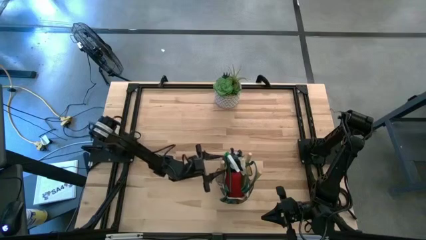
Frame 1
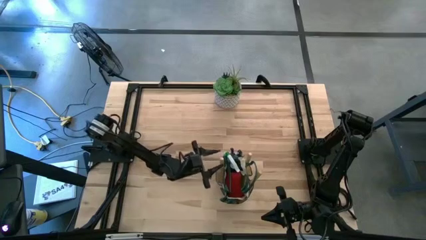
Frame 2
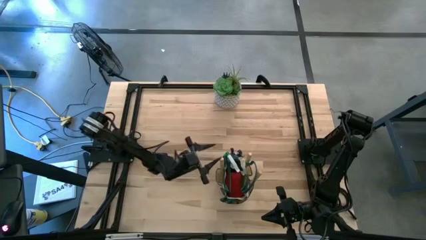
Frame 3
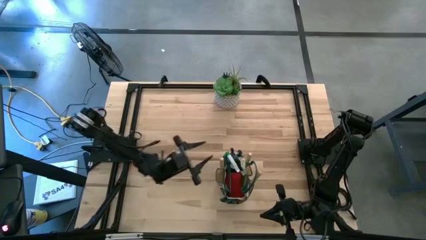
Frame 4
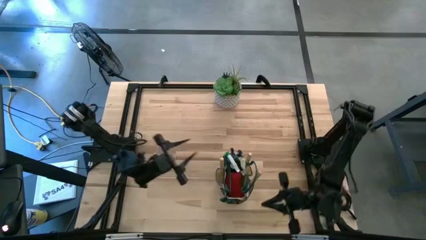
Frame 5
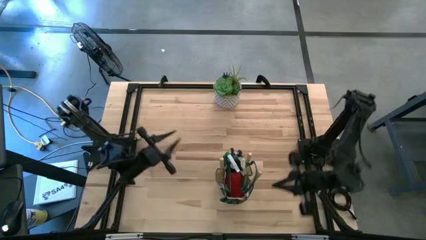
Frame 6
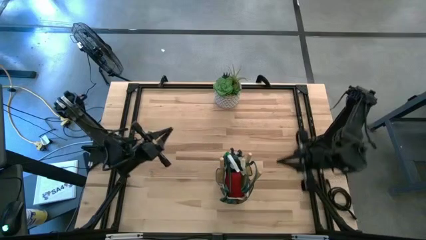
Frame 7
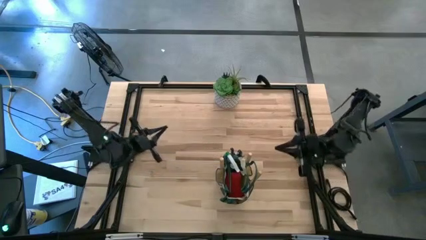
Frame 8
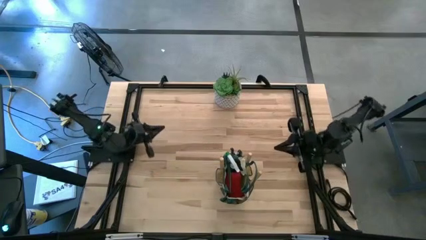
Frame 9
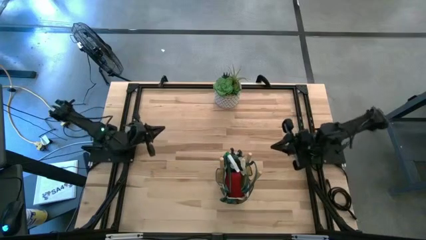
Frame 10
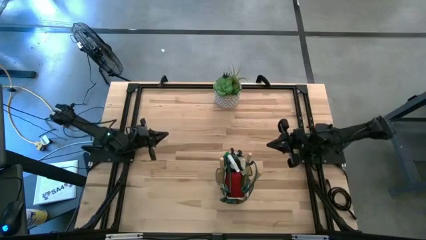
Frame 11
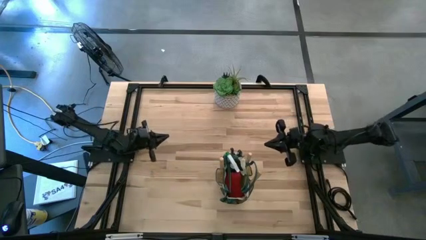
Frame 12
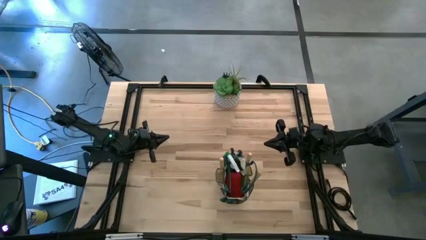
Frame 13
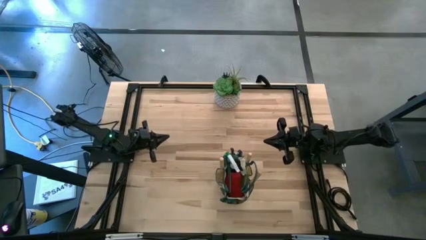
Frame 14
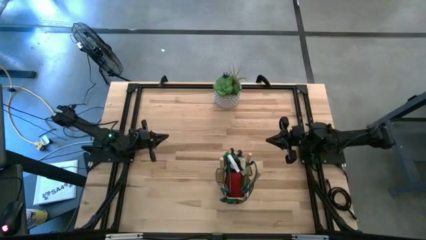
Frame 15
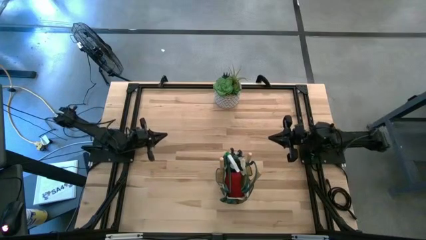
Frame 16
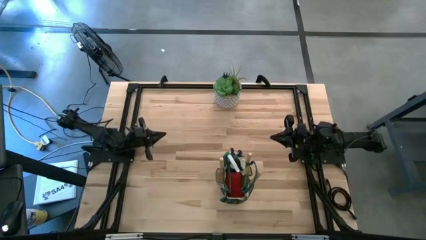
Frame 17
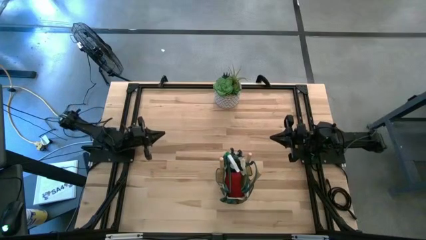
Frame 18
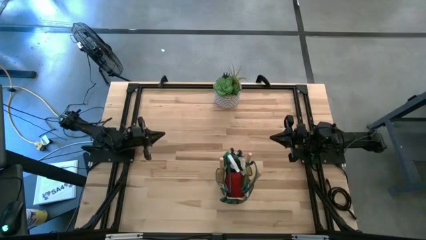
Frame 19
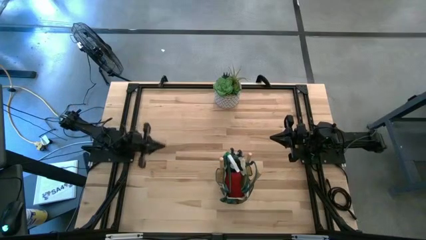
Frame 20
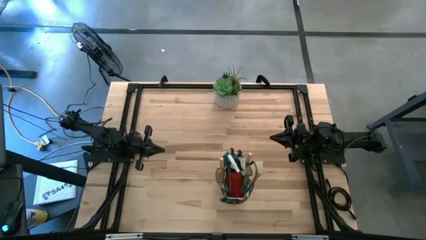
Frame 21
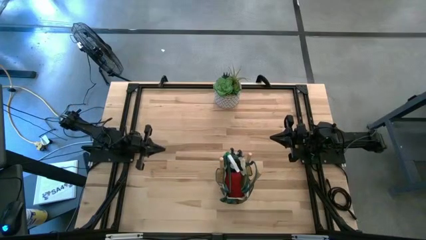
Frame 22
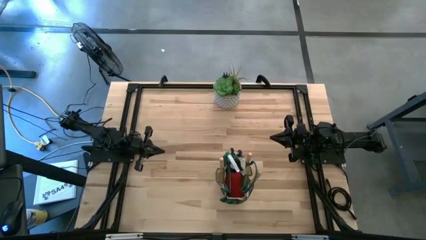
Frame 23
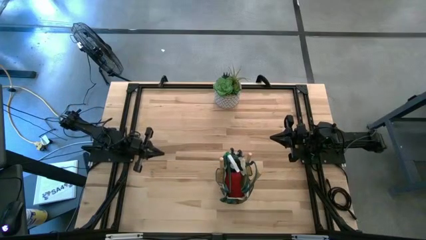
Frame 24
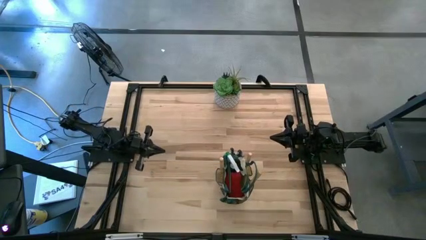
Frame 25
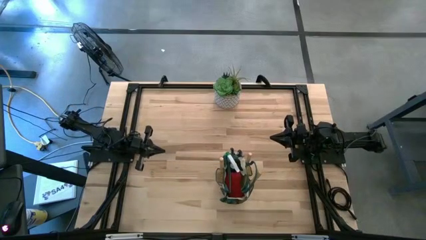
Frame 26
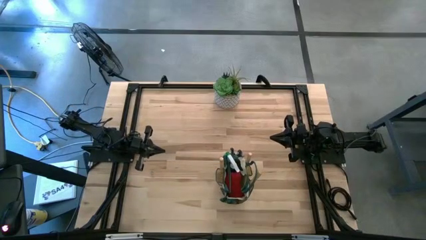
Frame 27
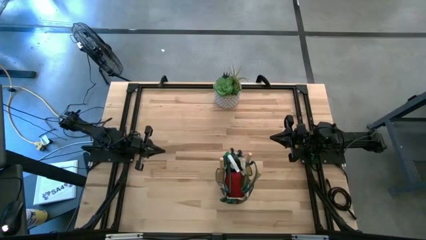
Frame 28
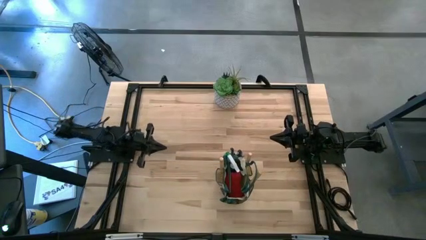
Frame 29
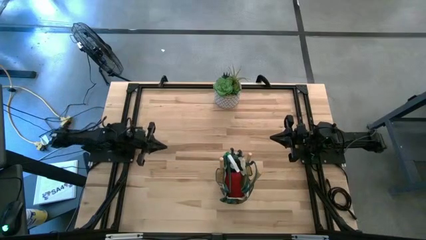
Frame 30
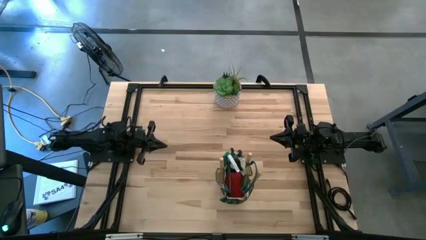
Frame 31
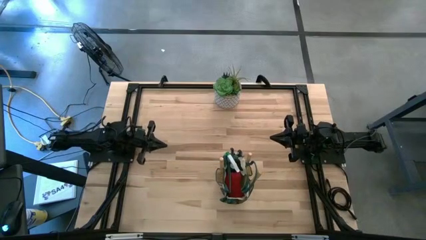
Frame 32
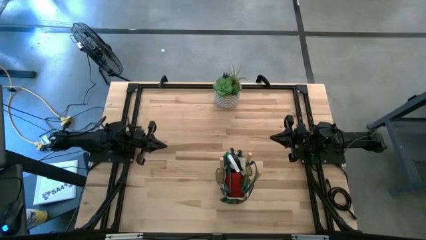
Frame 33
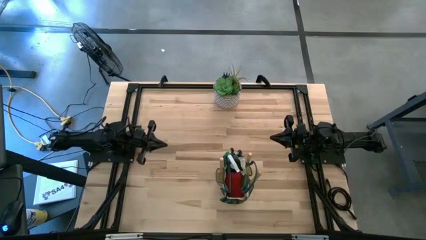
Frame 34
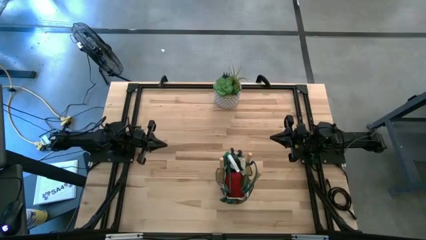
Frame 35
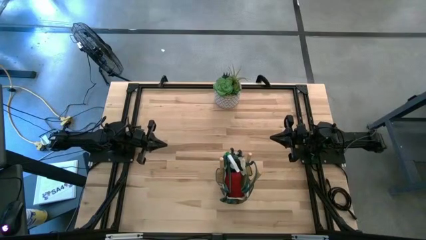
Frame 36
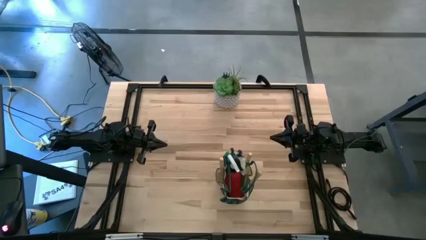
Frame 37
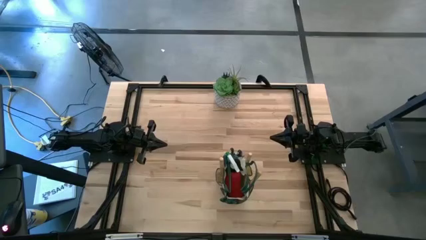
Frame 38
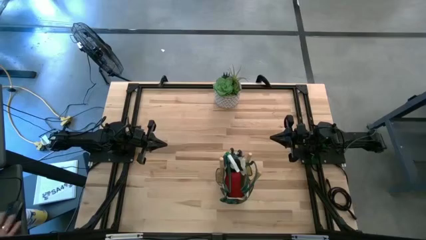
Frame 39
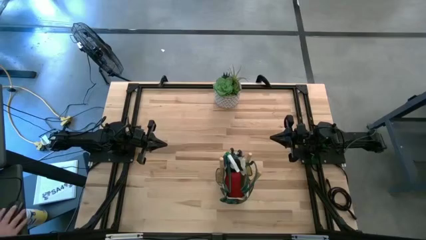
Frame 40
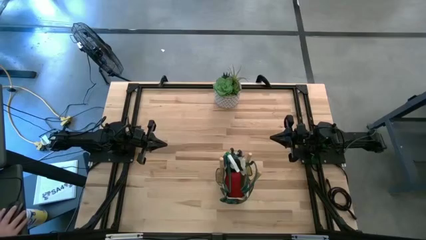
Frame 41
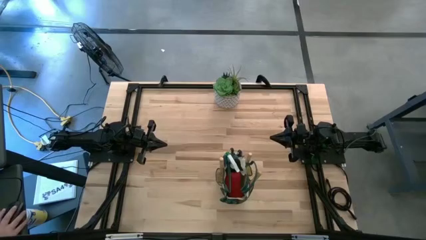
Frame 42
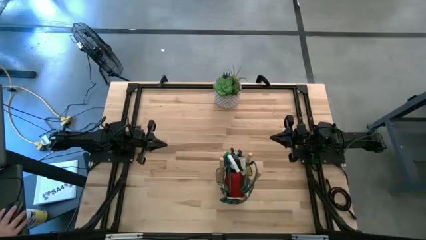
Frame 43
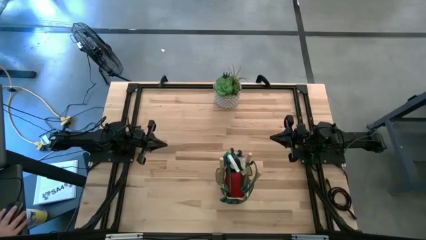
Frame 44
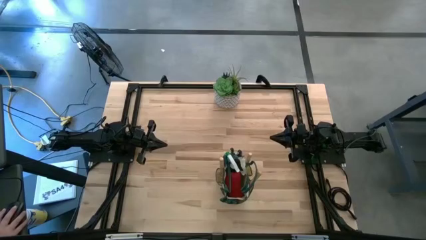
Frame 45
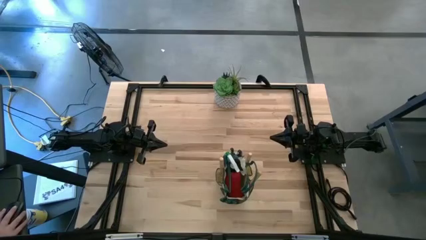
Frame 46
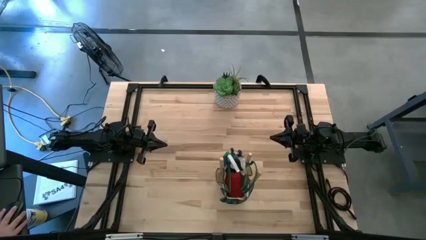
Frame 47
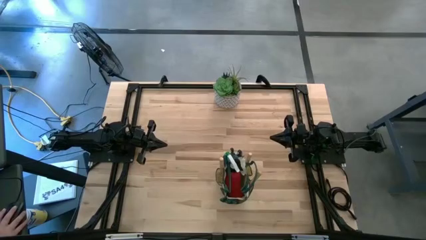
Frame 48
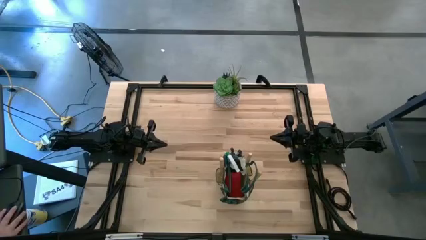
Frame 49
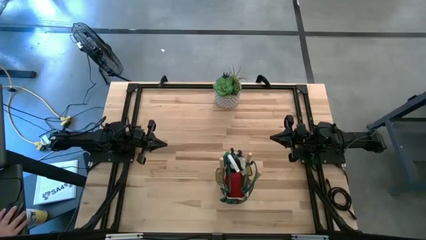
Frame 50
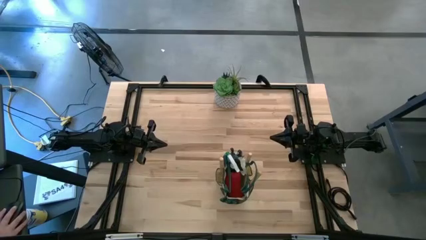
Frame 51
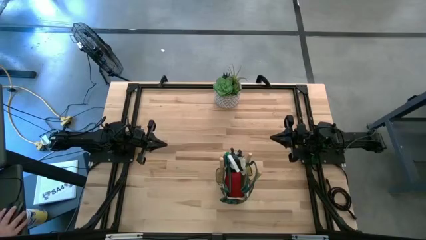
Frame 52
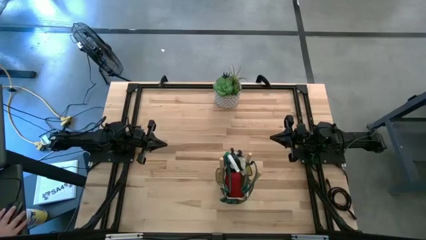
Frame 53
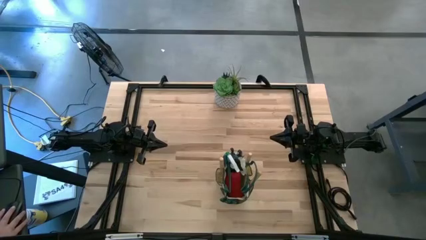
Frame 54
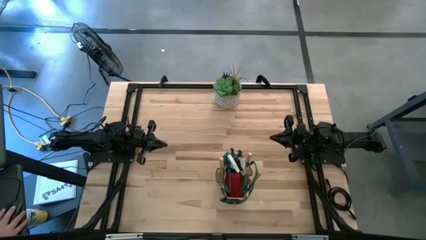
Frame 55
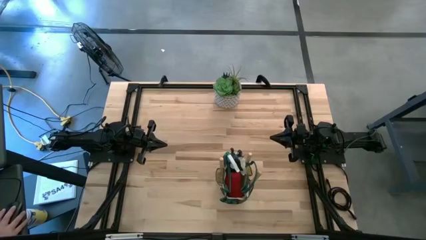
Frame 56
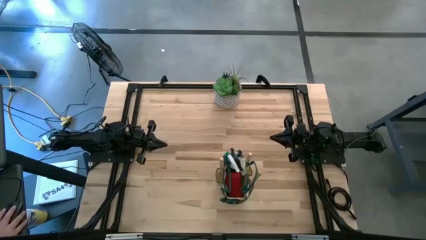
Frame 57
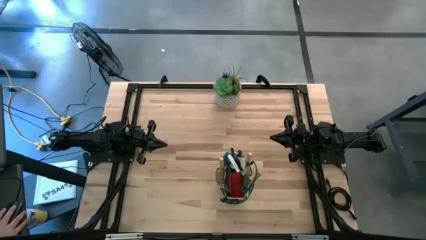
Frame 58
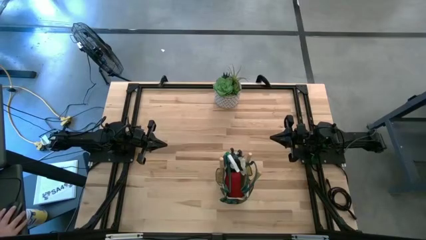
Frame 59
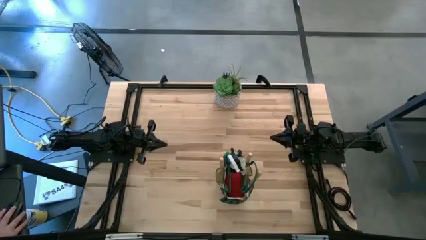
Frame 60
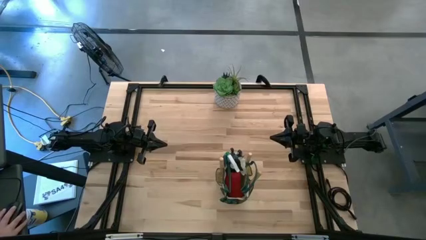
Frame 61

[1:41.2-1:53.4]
Task: Pick & Place Garden tools in Gardening bag
Return to Home Position

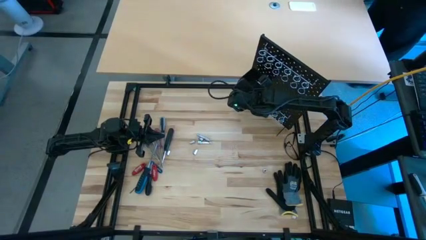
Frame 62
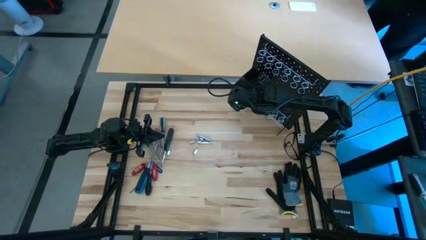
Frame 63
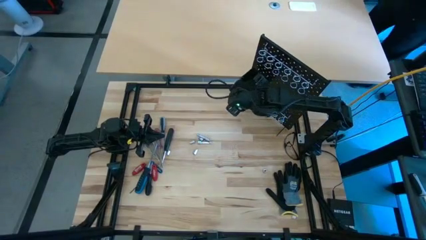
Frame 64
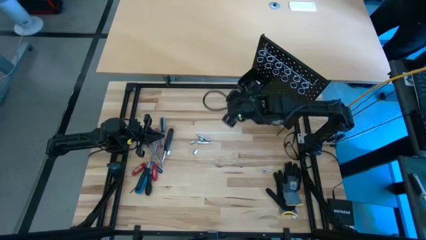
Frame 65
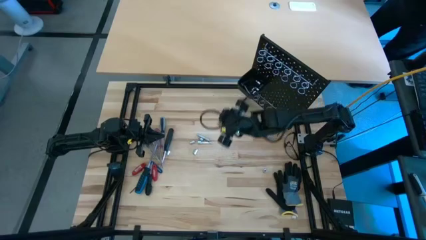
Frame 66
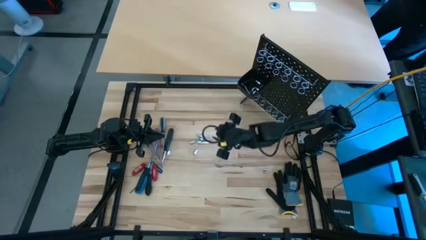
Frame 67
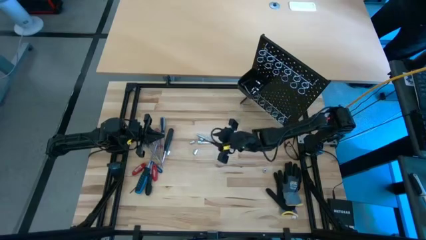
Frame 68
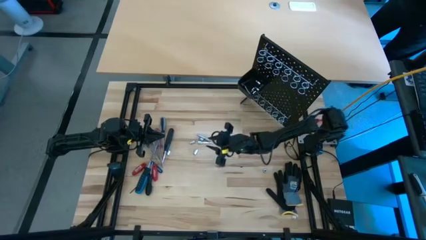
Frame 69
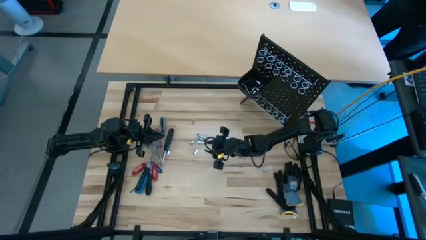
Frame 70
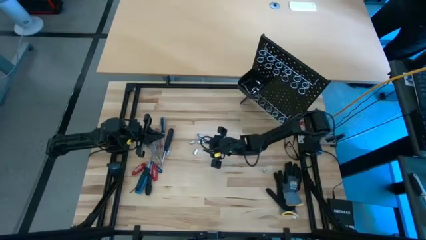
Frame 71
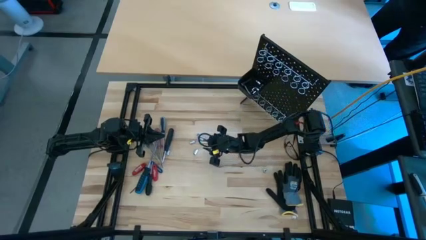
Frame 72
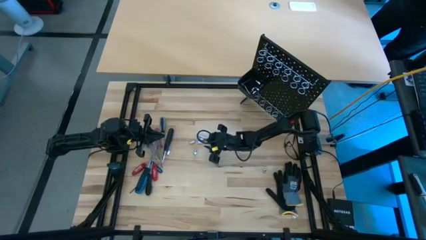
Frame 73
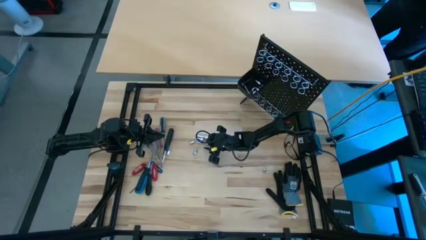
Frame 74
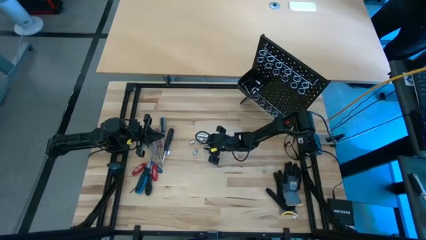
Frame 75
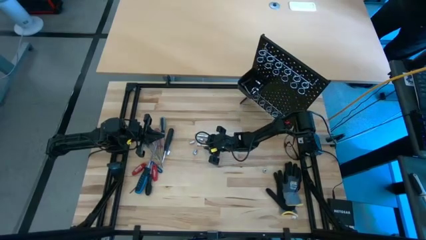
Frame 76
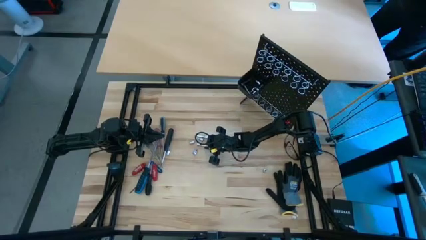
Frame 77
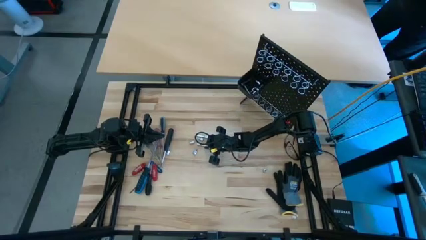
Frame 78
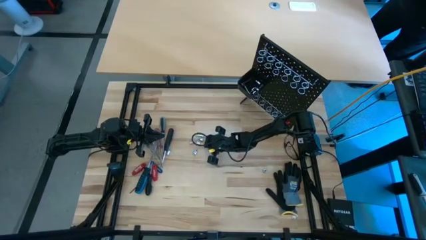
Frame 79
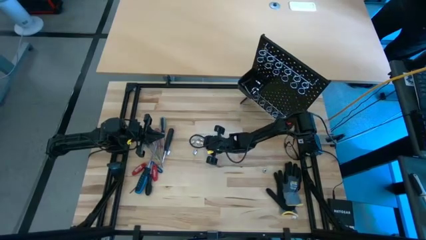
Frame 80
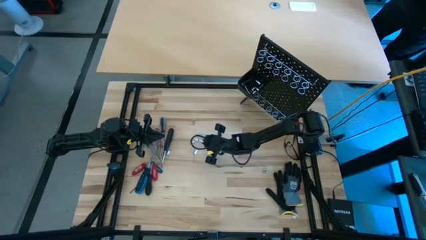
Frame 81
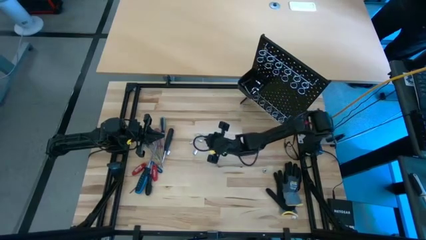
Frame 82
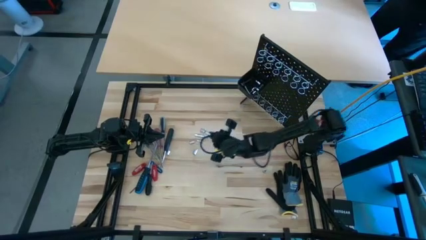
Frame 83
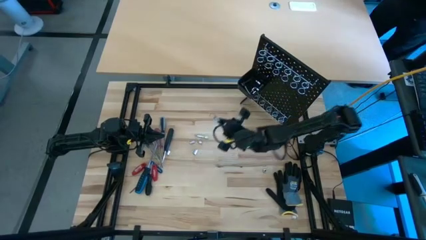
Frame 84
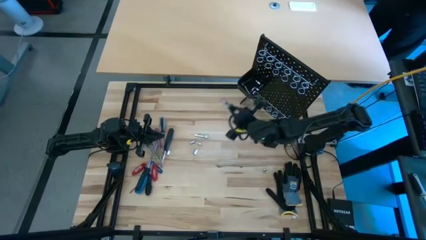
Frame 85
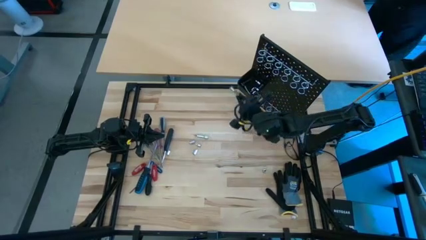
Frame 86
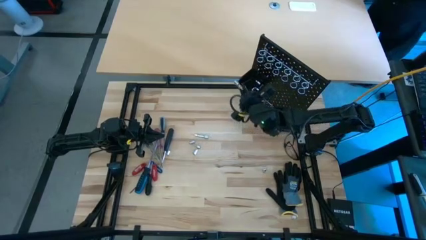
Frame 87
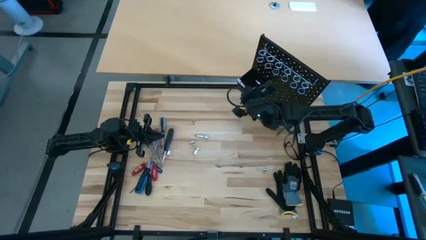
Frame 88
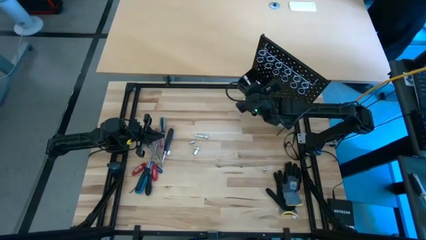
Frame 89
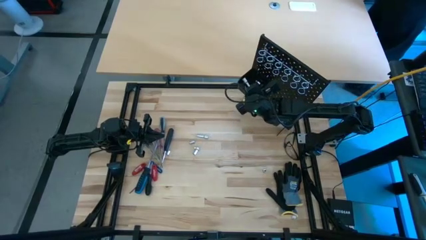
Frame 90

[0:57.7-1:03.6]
Task: Hang tools onto peg board
Put the extension bar into the black pegboard bin
